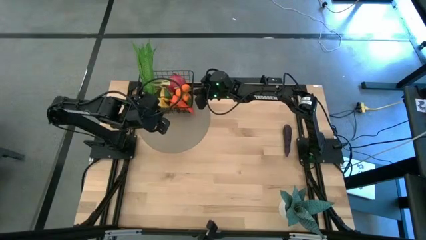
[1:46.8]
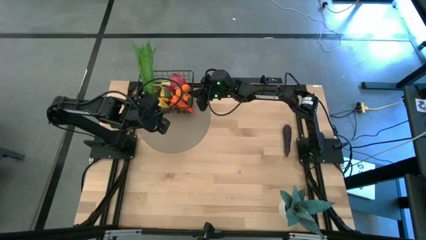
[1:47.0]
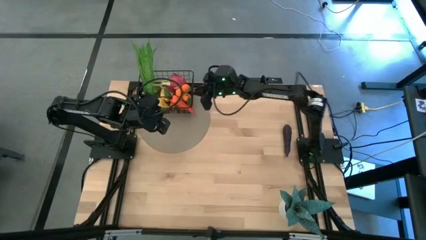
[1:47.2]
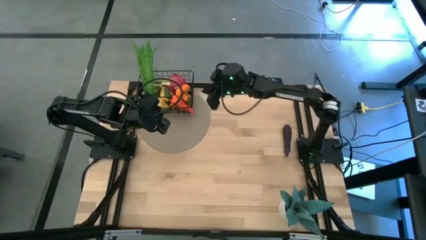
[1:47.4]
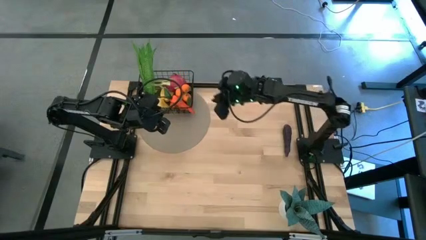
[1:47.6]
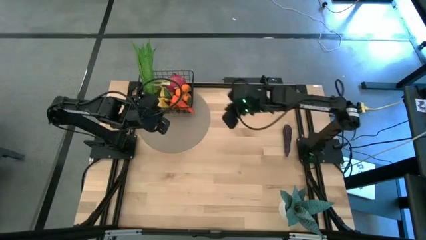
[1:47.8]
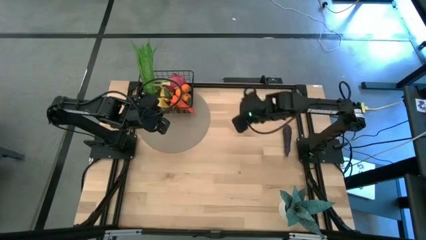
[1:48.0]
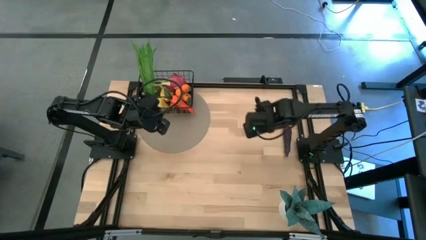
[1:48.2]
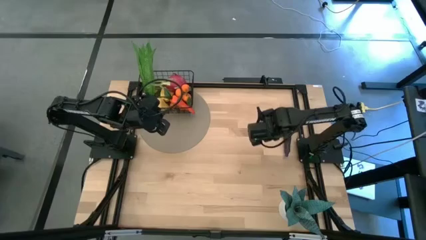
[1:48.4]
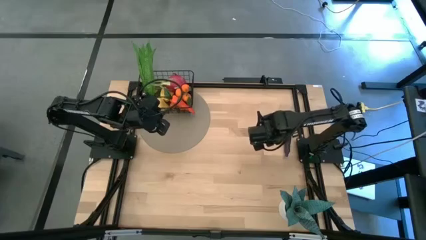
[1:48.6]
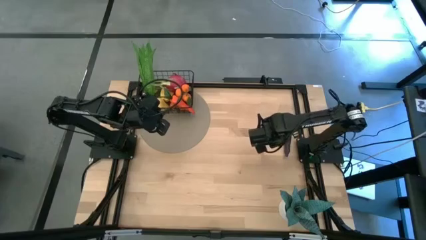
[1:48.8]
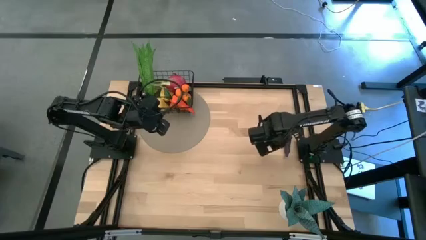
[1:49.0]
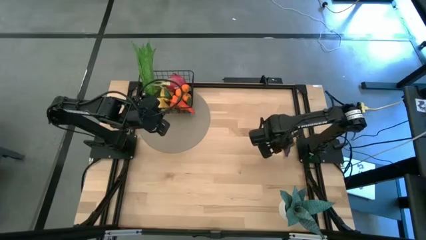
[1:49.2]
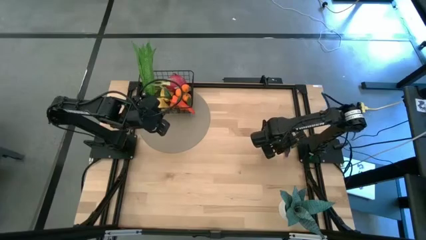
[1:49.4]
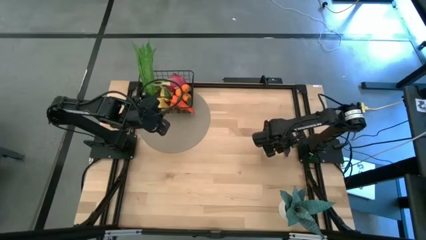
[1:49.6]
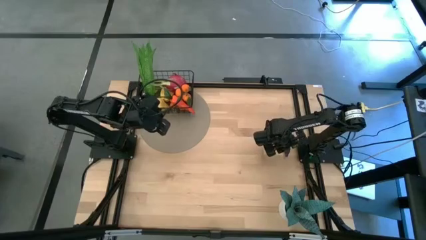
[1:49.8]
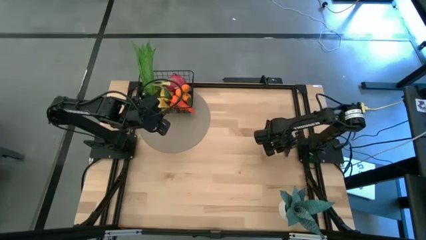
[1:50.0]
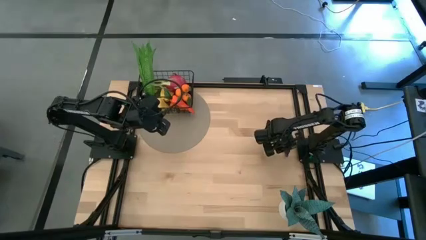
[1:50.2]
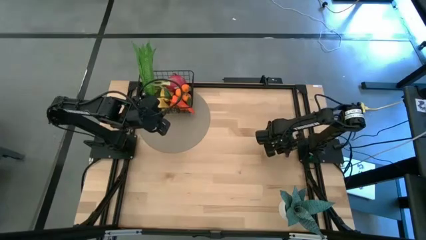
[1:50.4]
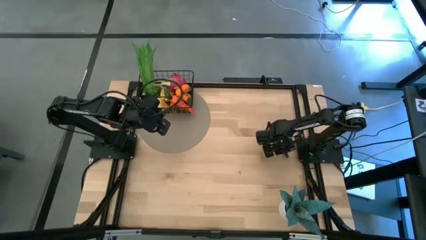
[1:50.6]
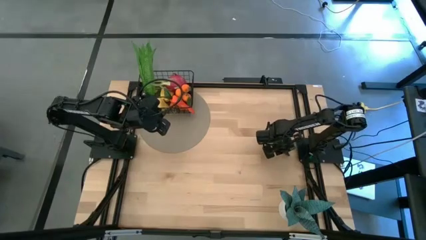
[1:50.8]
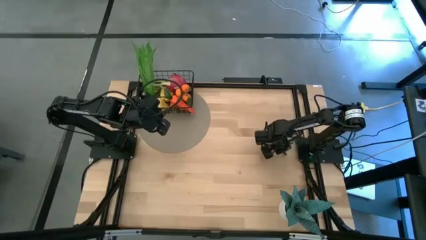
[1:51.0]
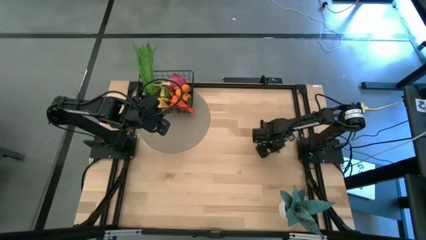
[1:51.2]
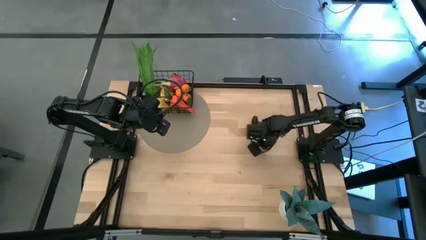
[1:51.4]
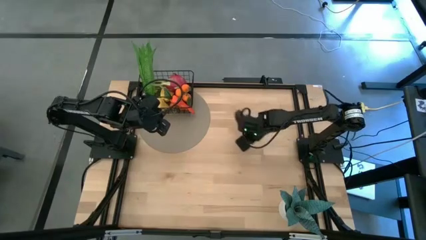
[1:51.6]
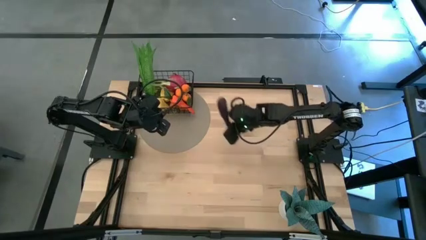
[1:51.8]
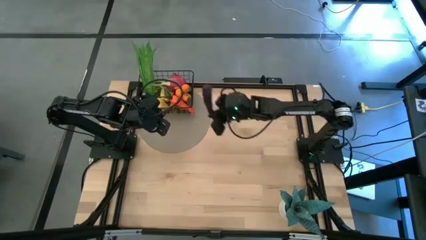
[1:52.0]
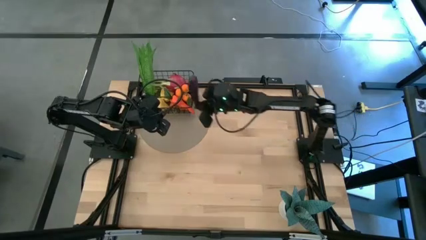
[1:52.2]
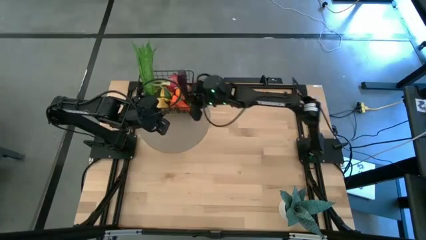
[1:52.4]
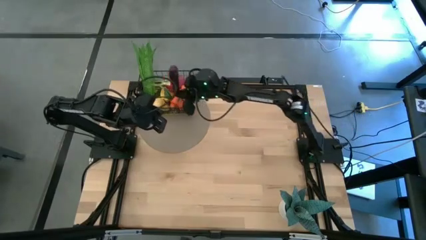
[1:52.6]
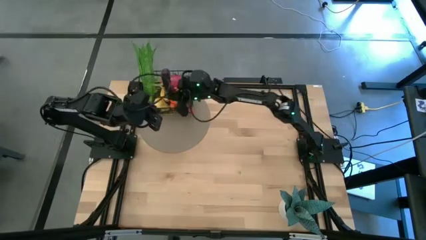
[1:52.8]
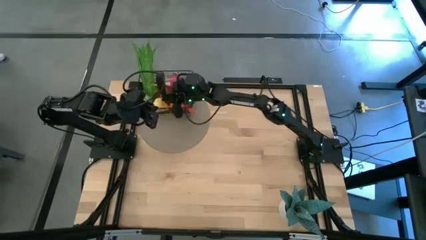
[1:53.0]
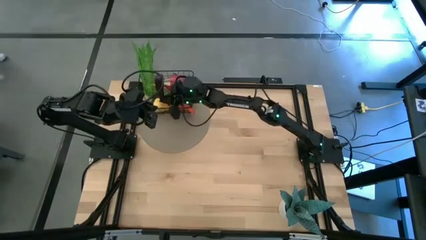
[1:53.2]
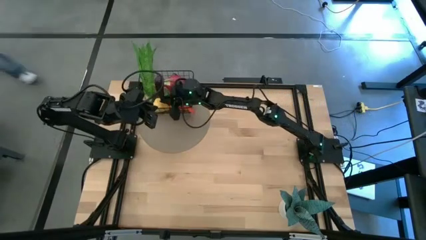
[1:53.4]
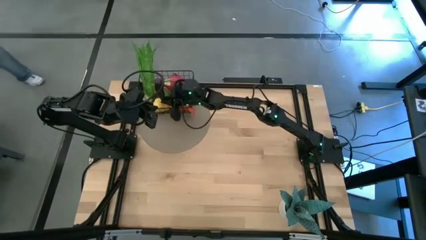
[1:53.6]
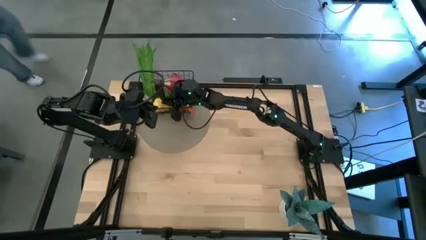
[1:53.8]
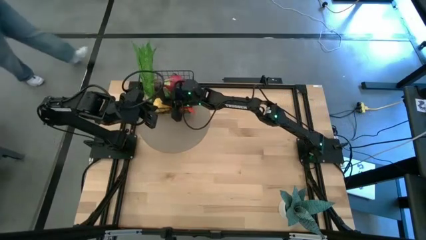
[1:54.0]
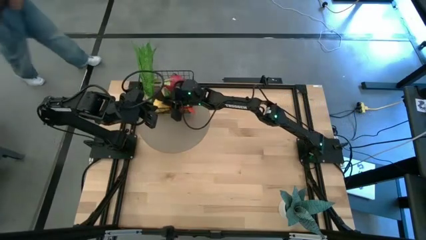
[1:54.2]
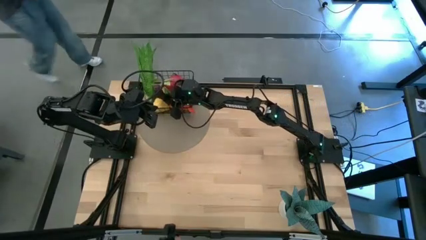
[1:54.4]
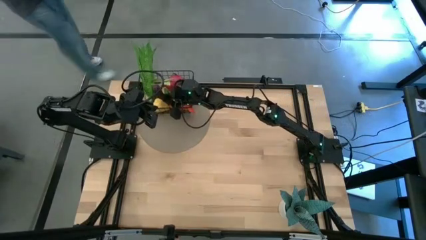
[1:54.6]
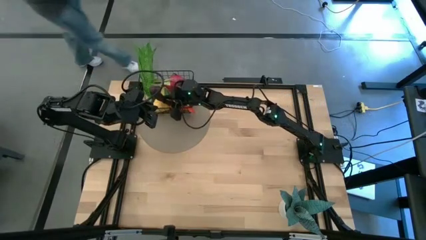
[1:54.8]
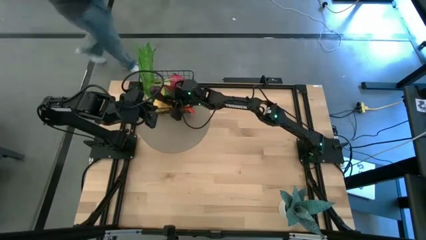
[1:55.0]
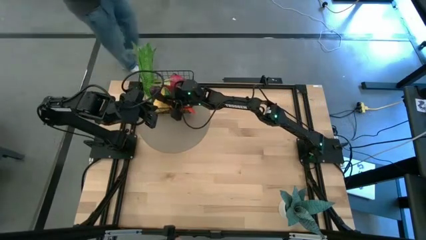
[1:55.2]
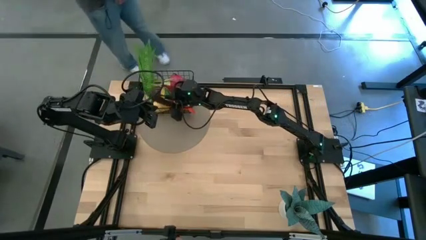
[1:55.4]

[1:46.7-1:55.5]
Task: Build produce basket
Put the purple eggplant into the wire basket

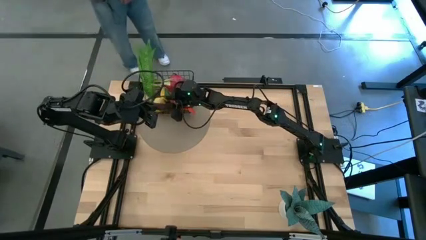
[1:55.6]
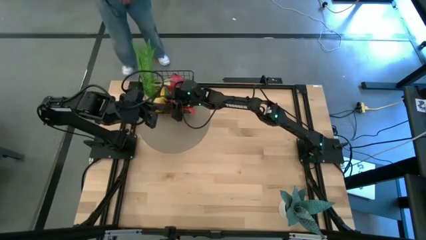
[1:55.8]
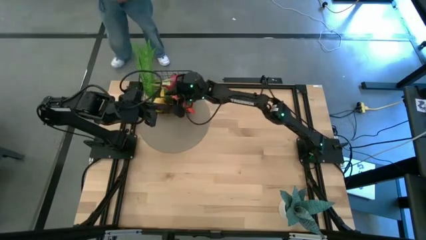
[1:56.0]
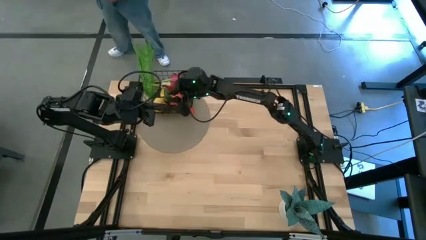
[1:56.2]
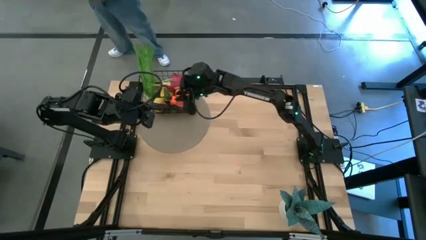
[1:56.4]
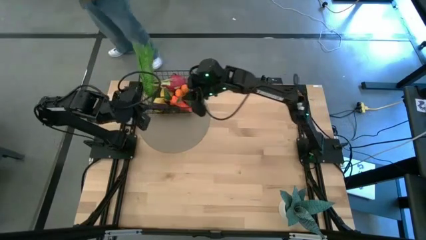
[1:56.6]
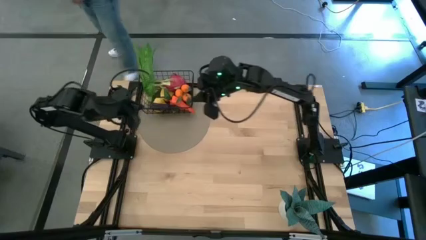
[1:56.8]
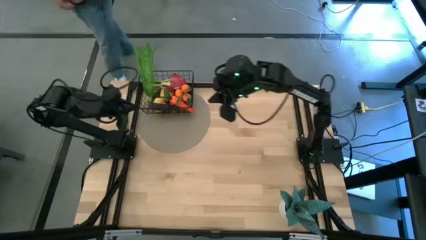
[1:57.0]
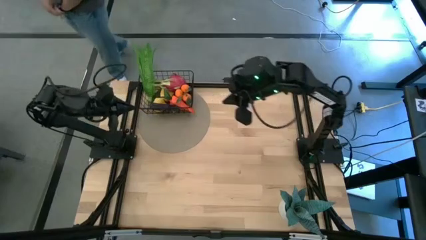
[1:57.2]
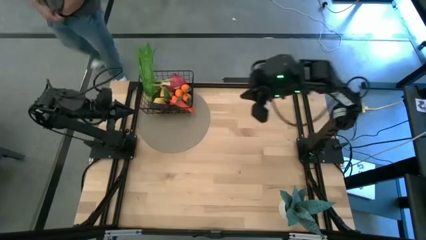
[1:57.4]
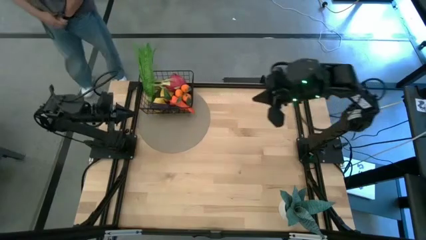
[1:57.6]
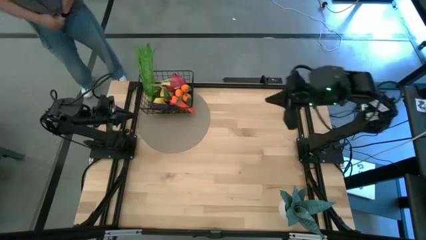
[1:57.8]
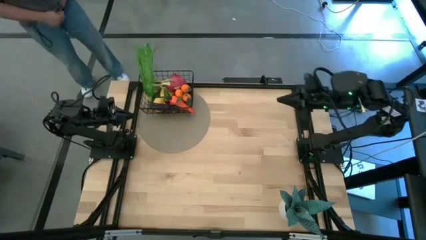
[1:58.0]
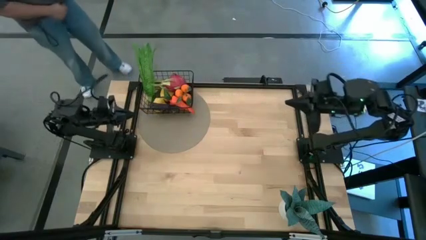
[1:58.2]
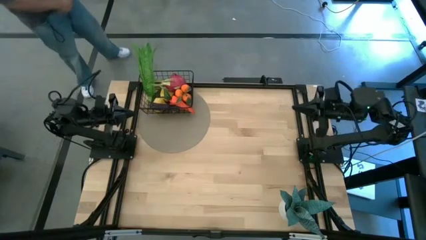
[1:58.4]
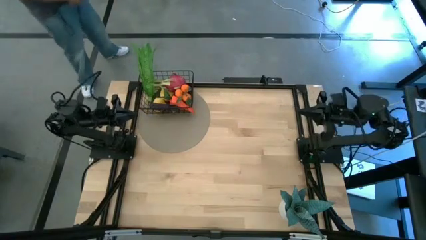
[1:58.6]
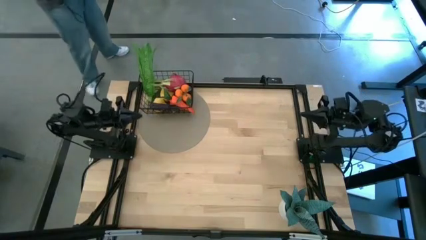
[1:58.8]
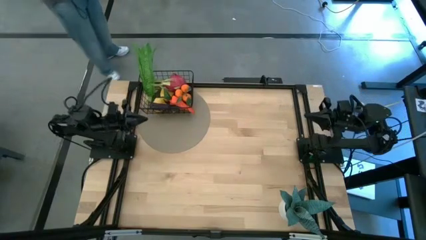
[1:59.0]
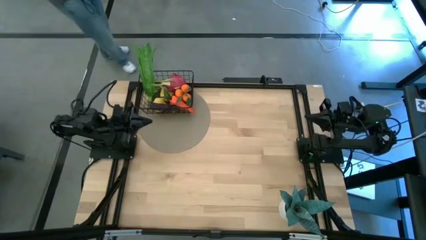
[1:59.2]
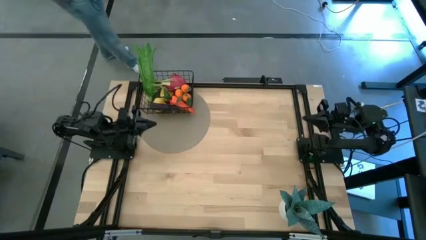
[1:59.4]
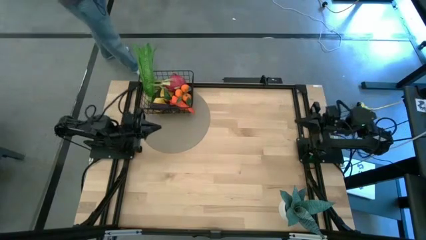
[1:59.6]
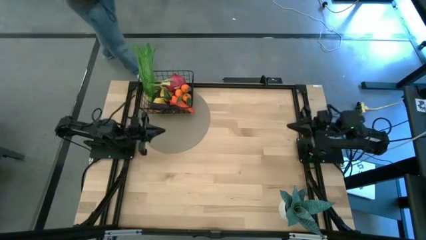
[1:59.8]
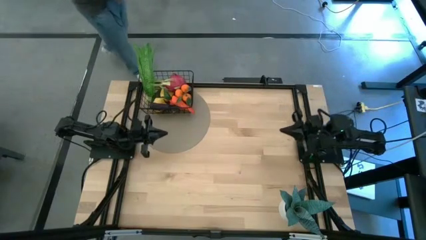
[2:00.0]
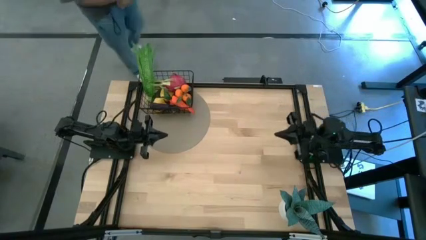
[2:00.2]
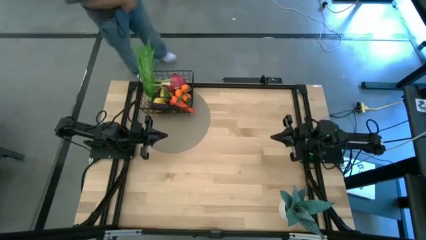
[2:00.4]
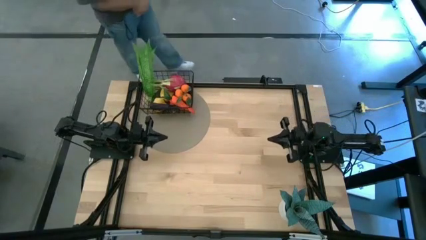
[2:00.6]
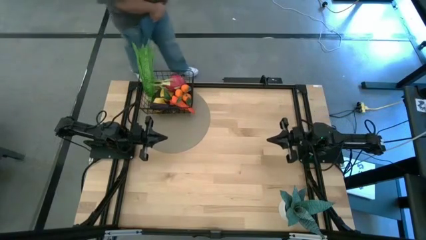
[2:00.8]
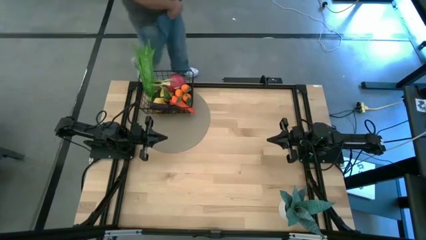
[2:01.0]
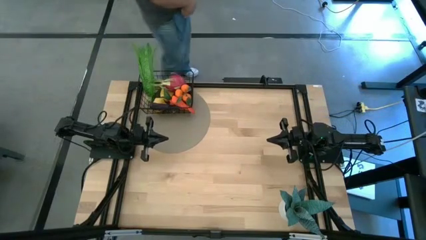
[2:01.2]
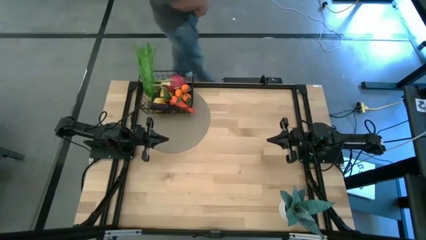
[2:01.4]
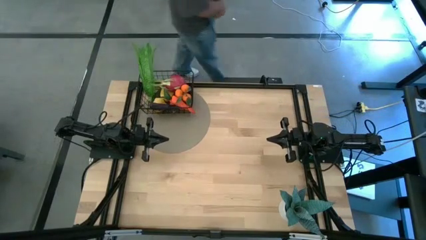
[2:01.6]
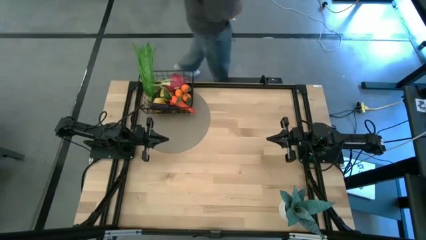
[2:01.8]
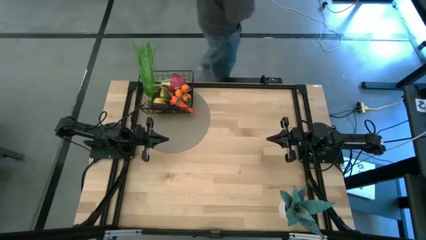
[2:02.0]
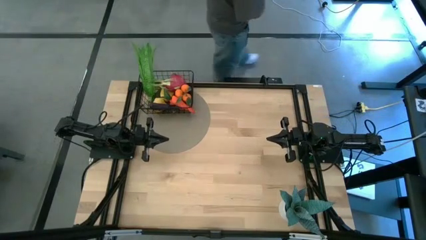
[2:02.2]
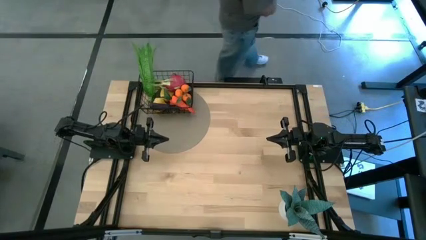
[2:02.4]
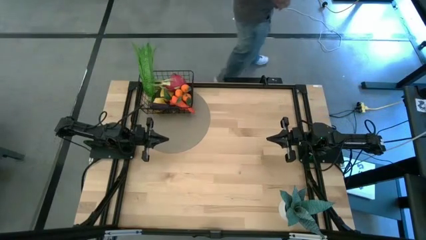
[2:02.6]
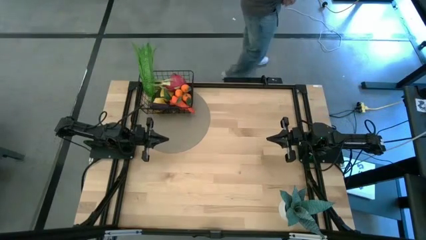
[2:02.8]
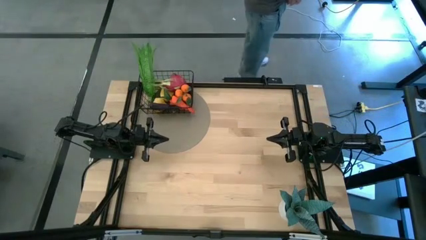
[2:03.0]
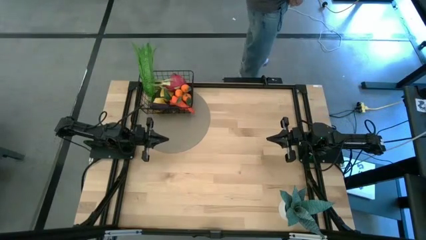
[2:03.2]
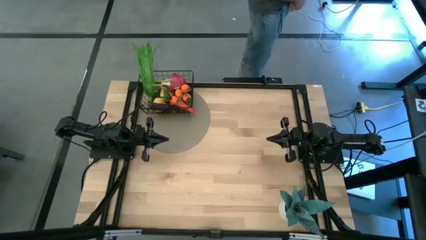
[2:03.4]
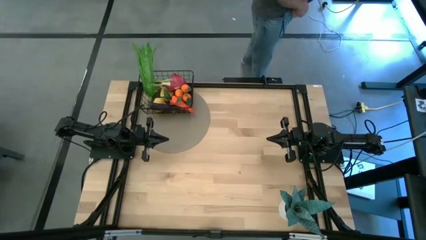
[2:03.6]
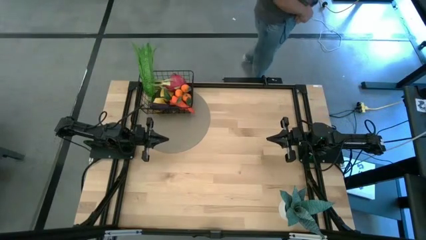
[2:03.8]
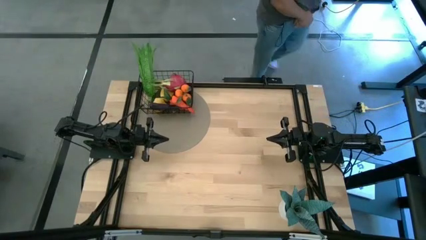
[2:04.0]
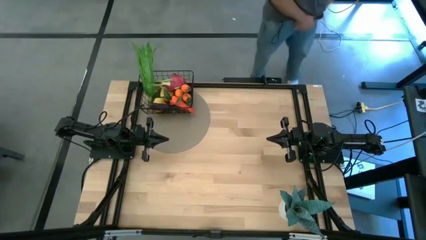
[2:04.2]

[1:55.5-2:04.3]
Return to Home Position
